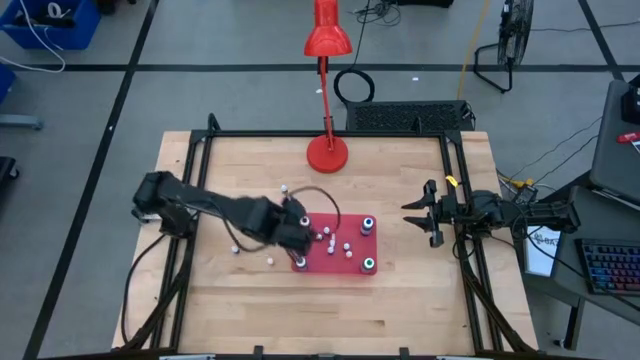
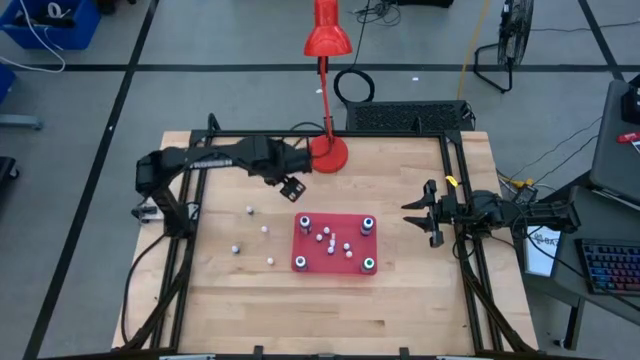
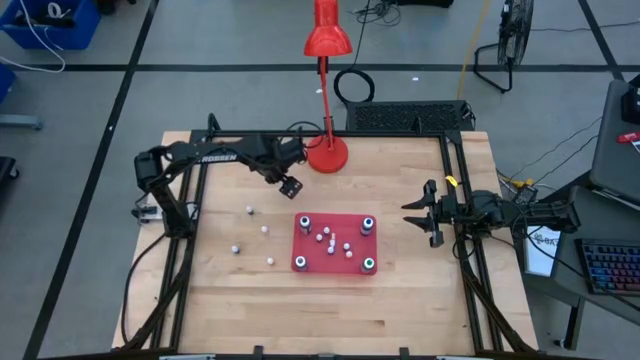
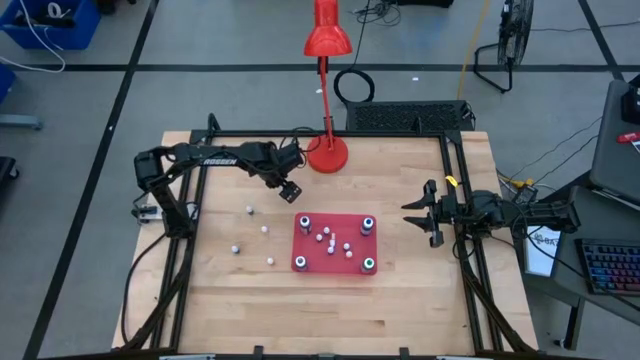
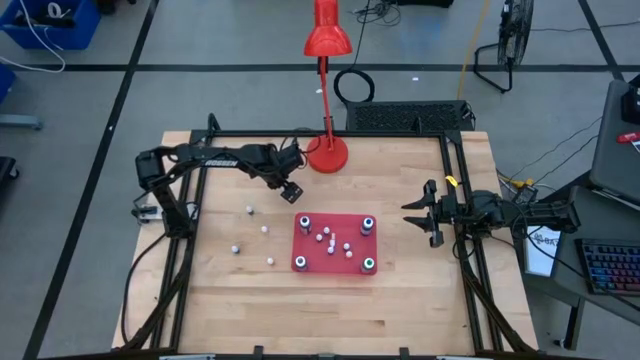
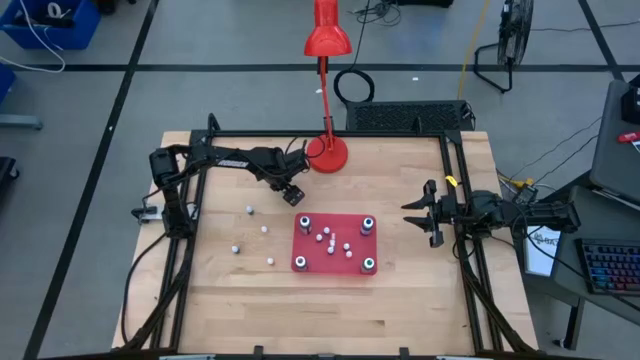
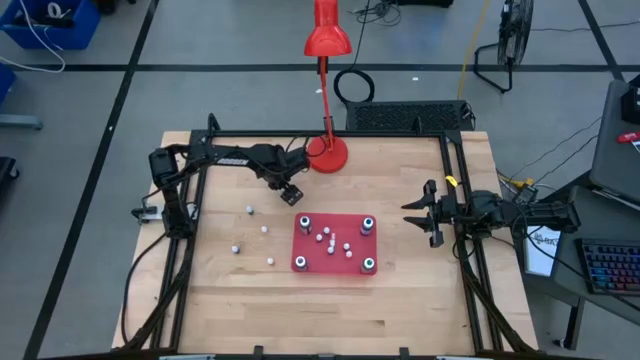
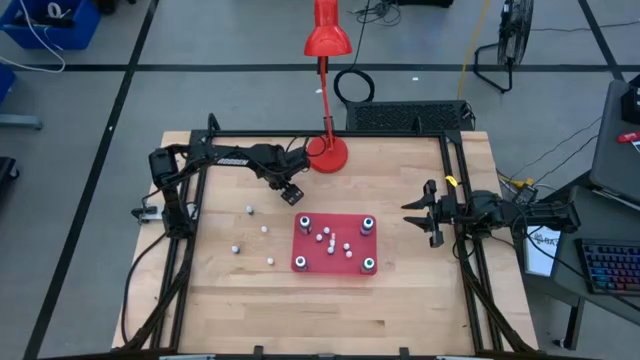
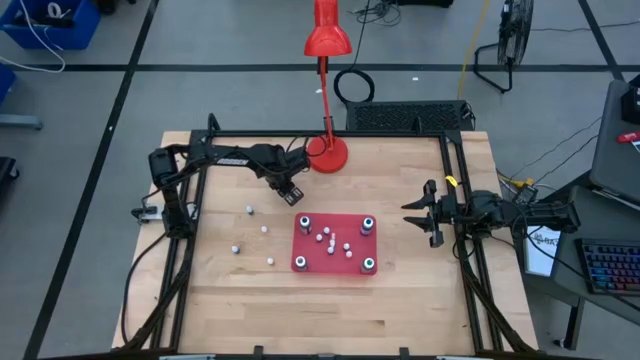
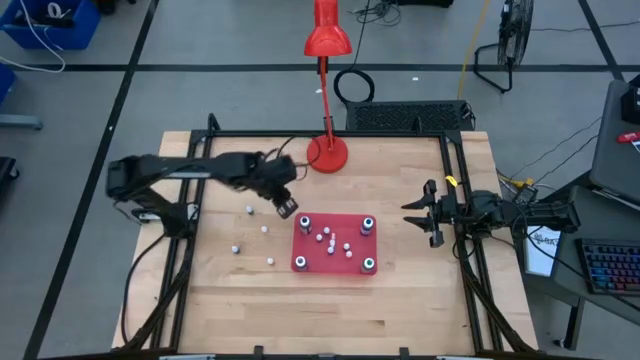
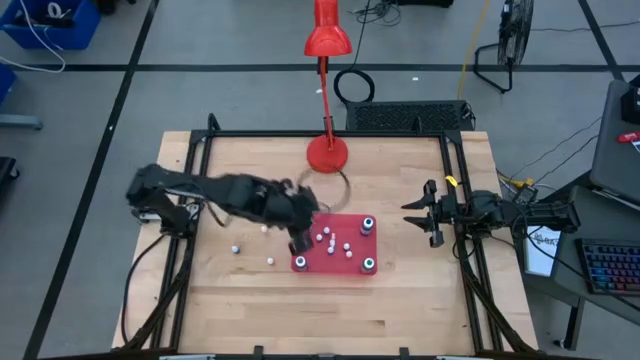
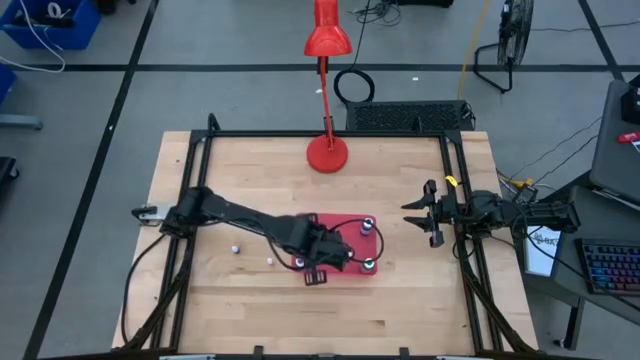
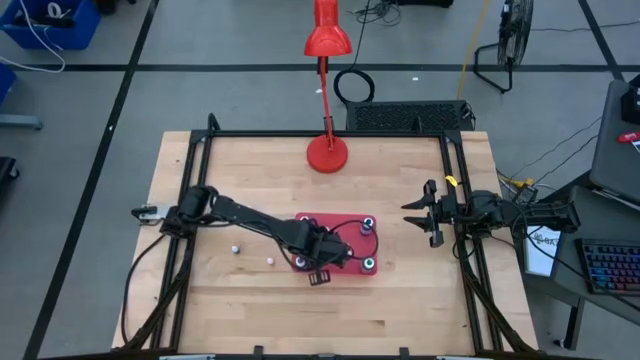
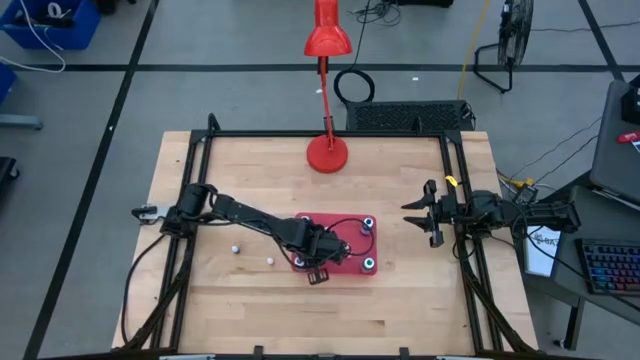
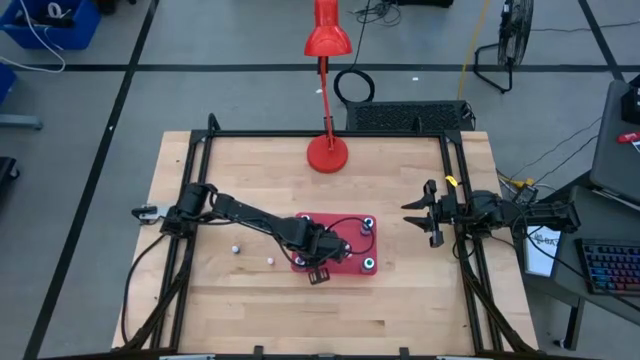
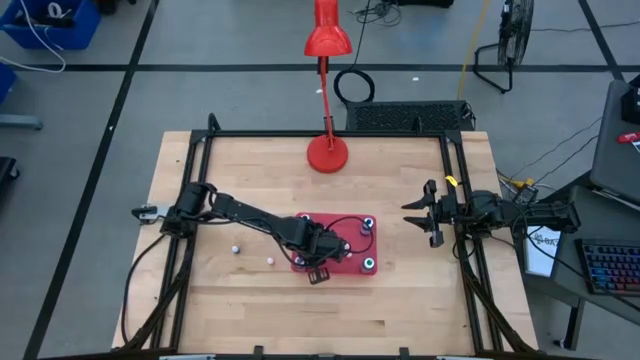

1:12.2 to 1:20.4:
Task: Pick & Place food coloring
Put the small blue food coloring bottle into the pink bin

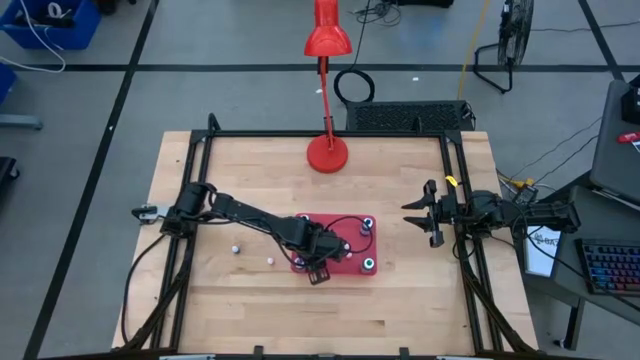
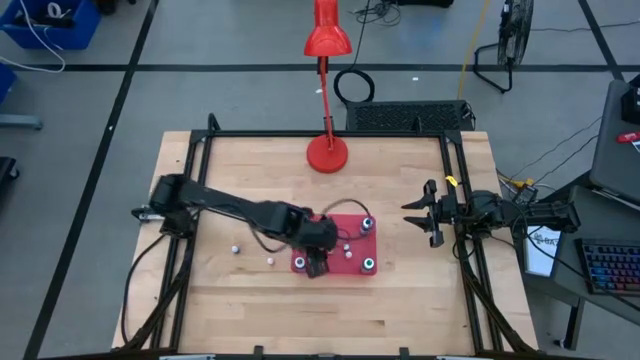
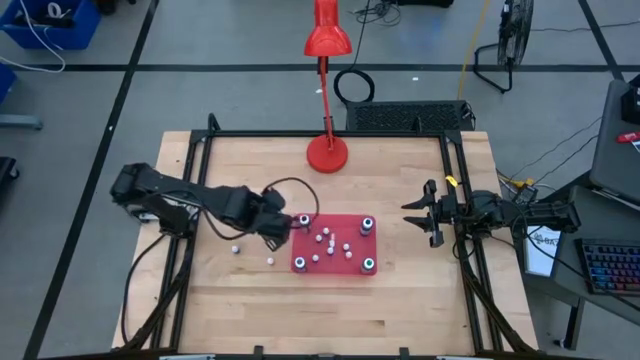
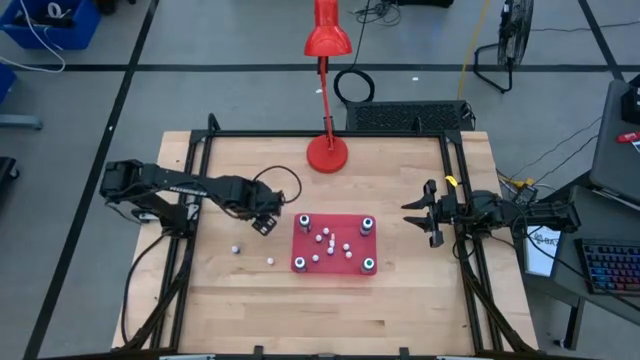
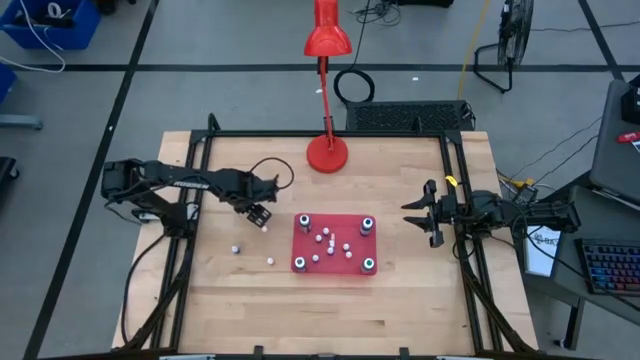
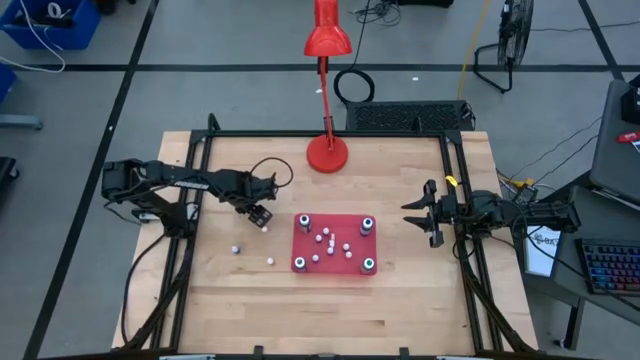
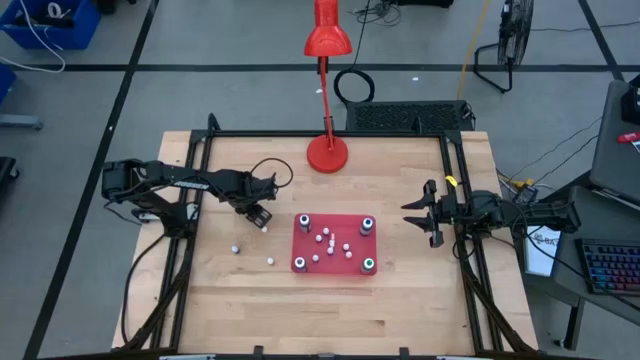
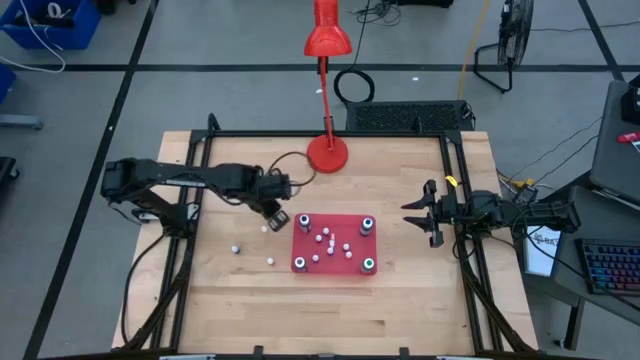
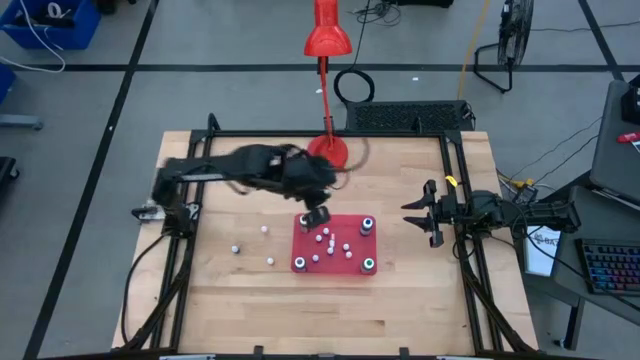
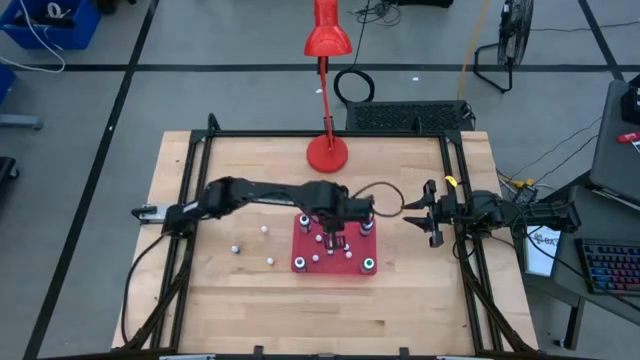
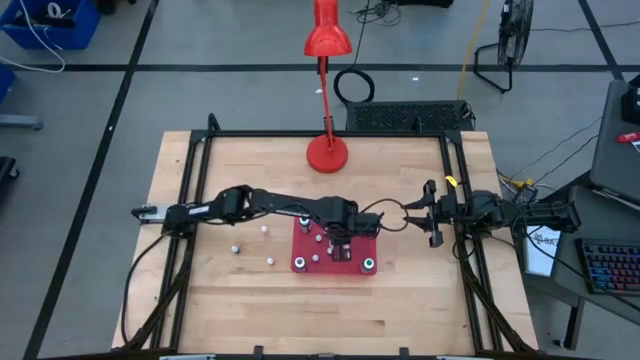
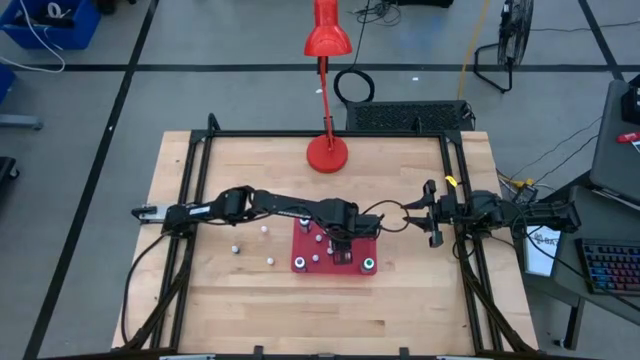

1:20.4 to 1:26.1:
Put the small green food coloring bottle into the pink bin

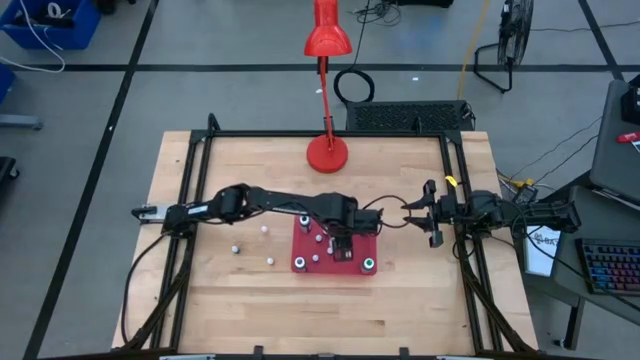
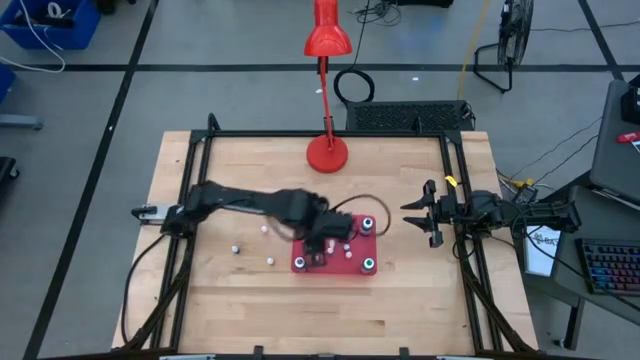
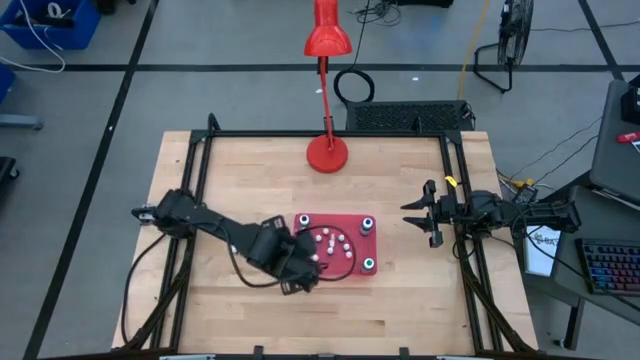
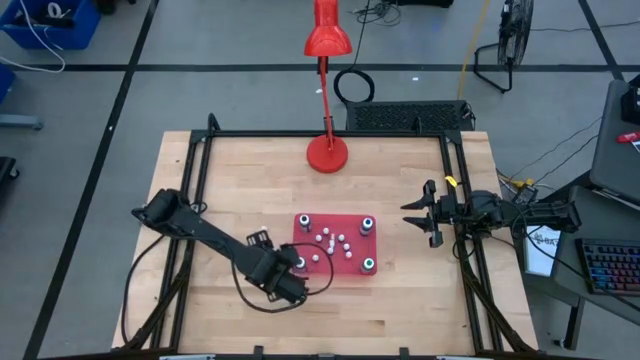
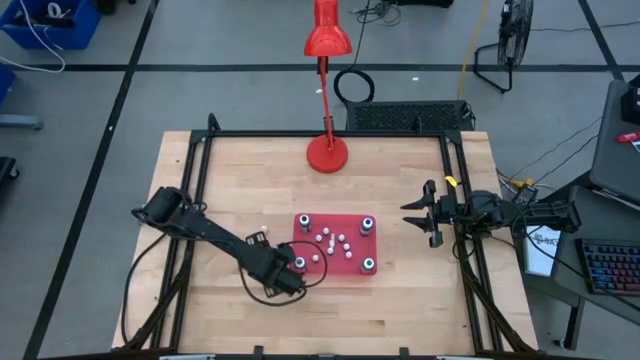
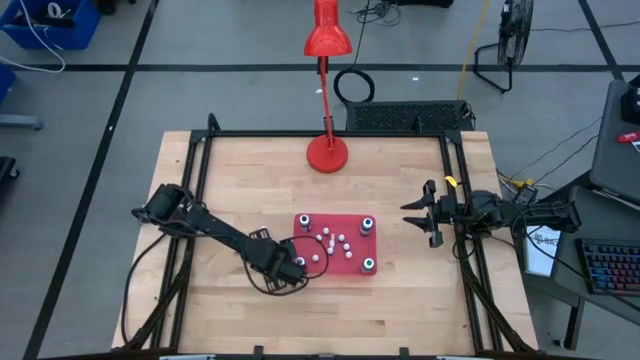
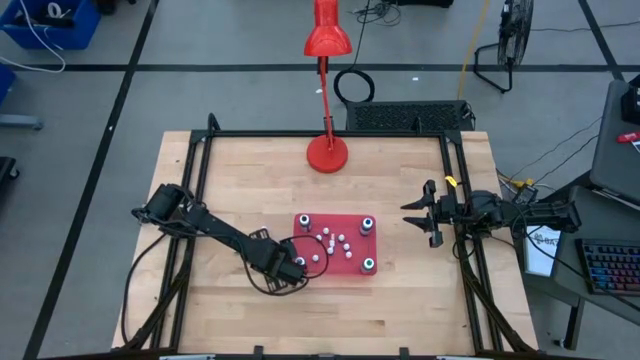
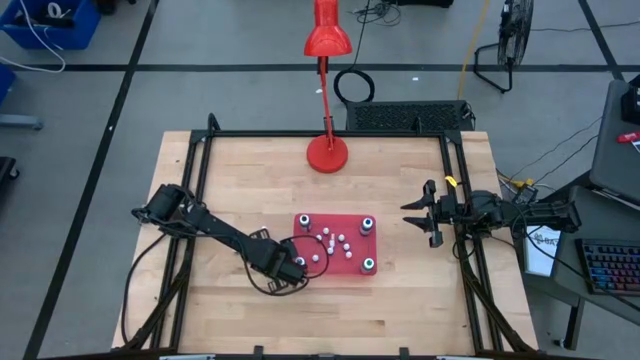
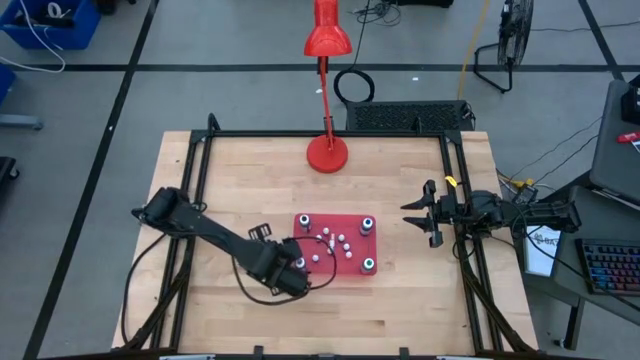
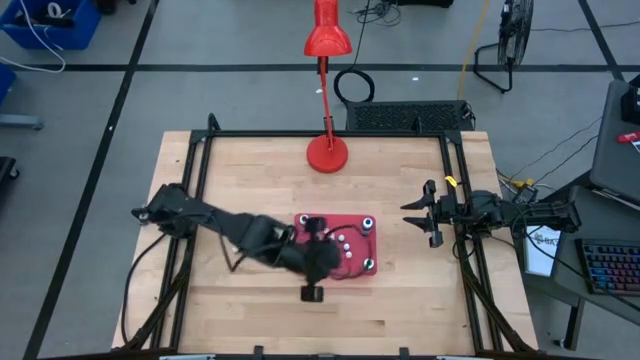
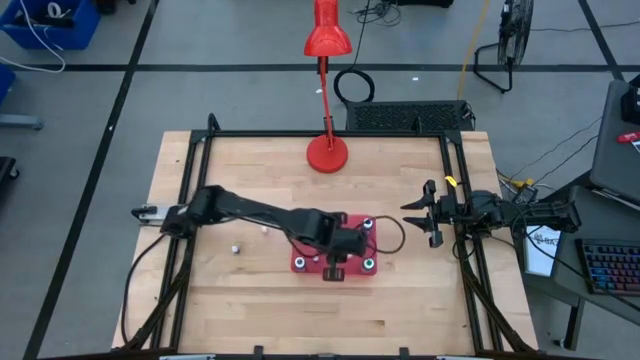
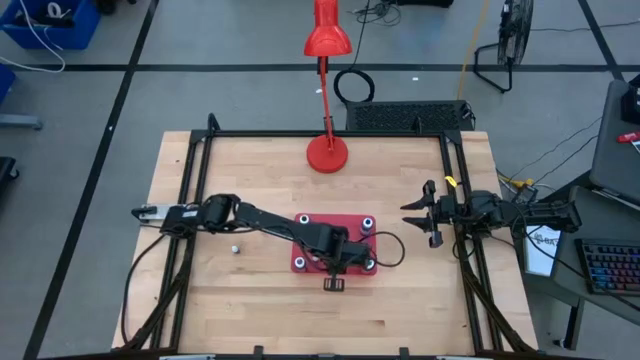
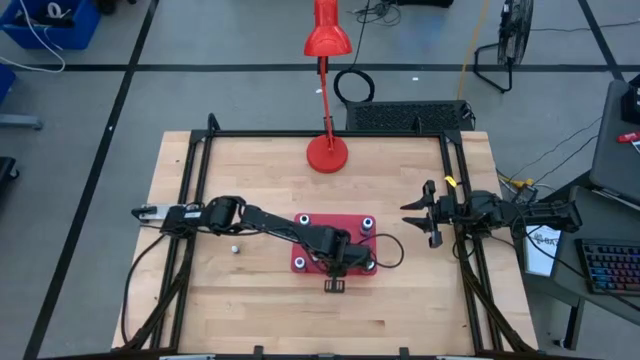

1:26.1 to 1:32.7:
Put the small orange food coloring bottle into the pink bin

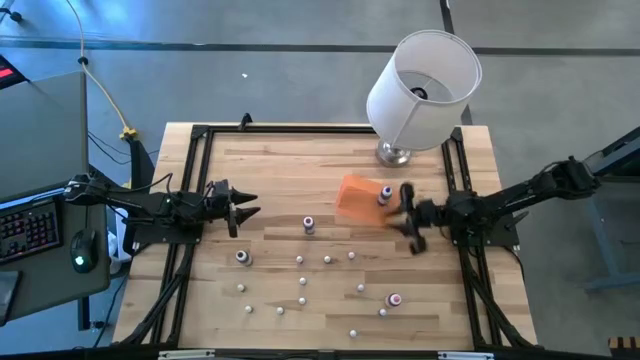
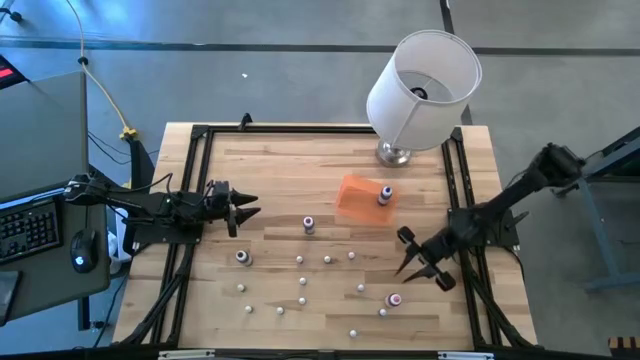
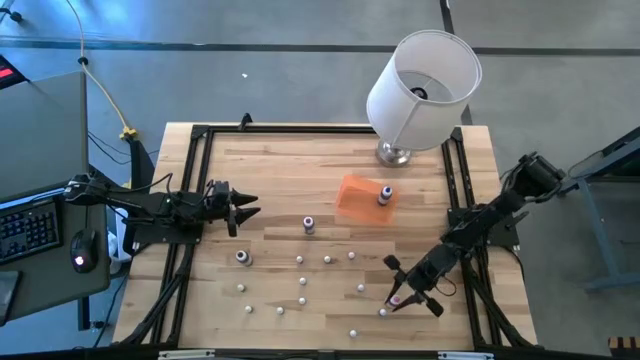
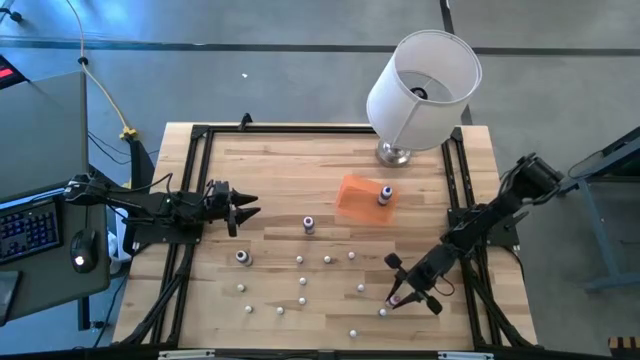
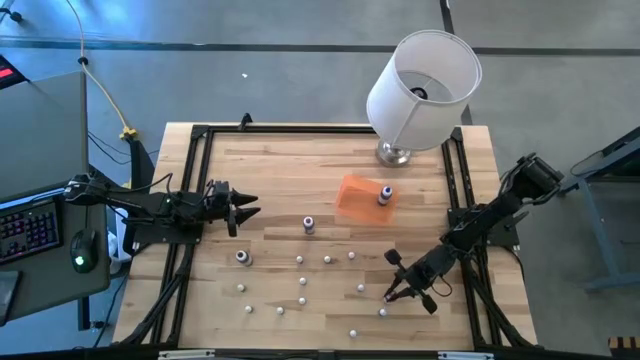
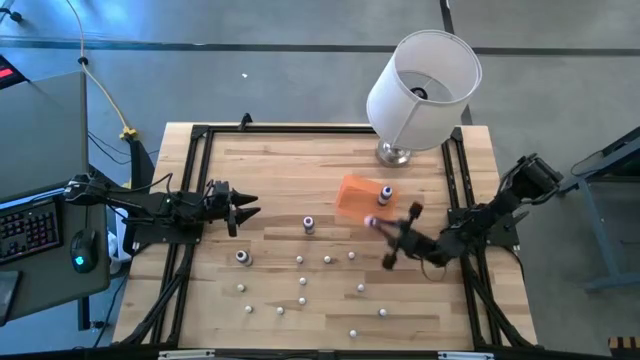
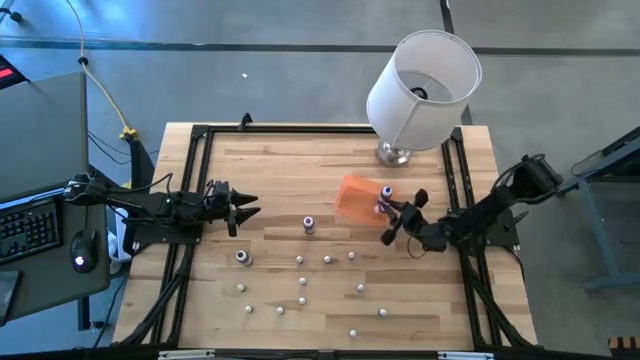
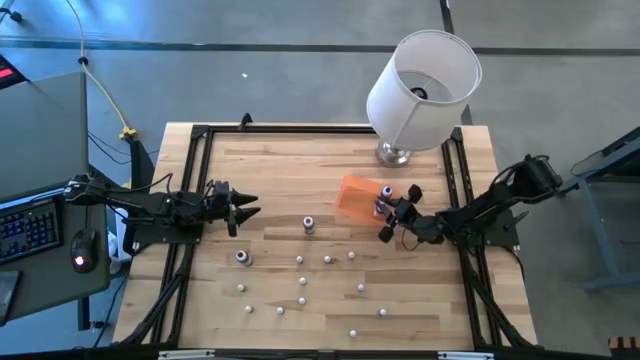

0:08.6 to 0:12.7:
Task: Pick & Place food coloring
Put the large pink food coloring bottle into the orange container
